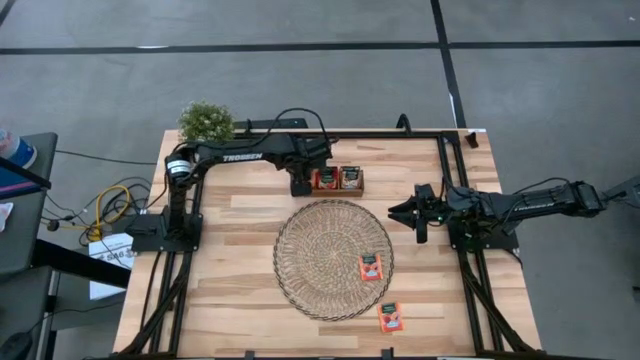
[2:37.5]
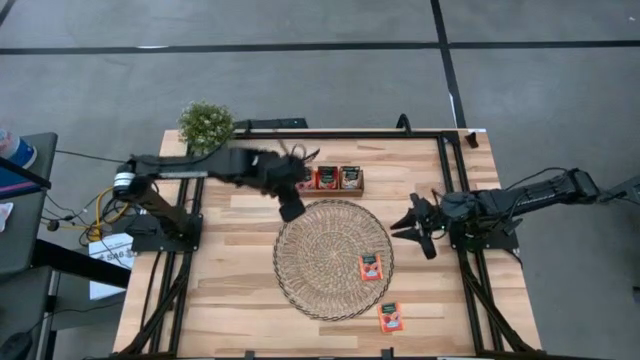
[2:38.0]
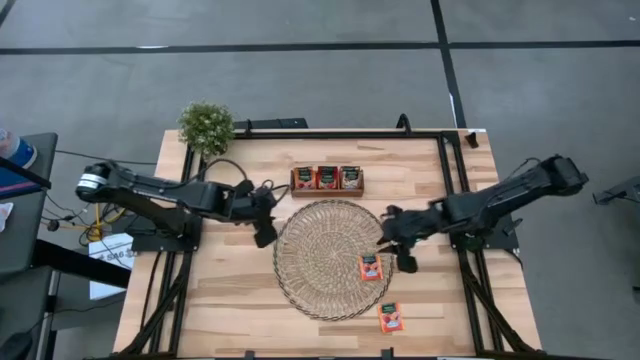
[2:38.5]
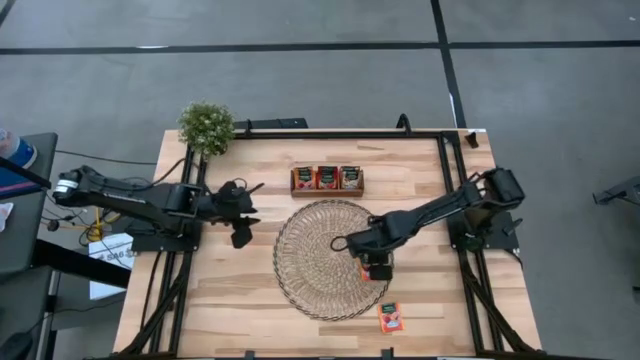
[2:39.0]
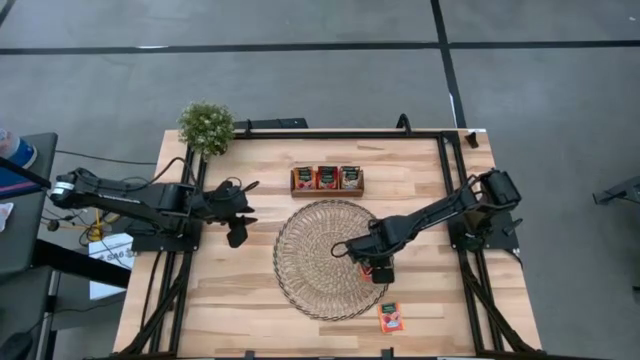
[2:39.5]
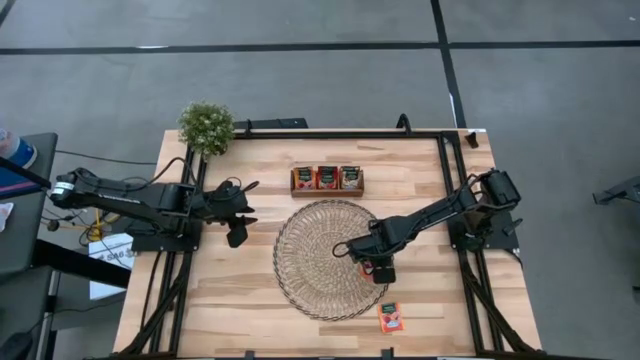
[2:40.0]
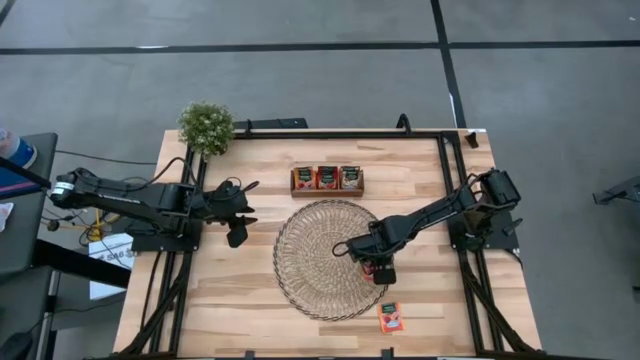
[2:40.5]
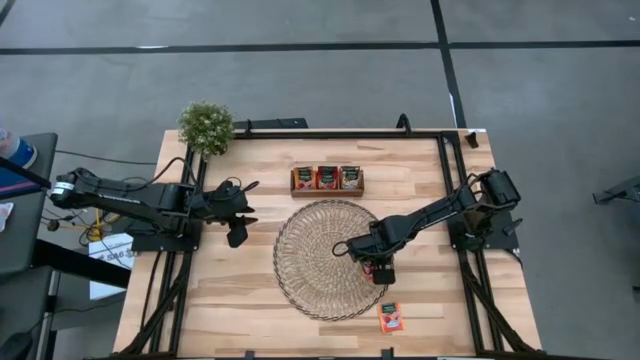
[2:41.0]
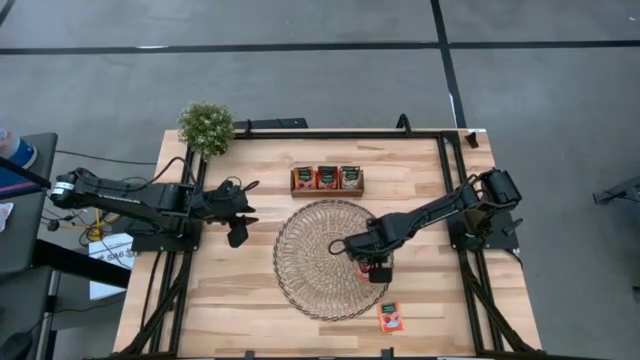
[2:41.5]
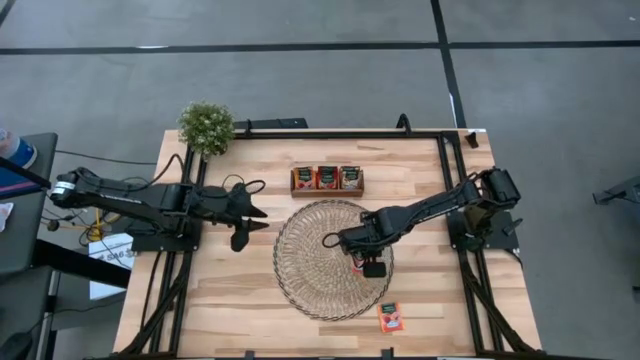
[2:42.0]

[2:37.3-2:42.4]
Task: Pick & Place Tea
Put the orange tea bag into the left section of the wooden organizer

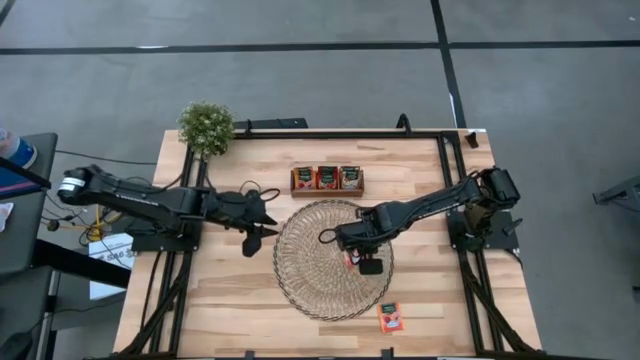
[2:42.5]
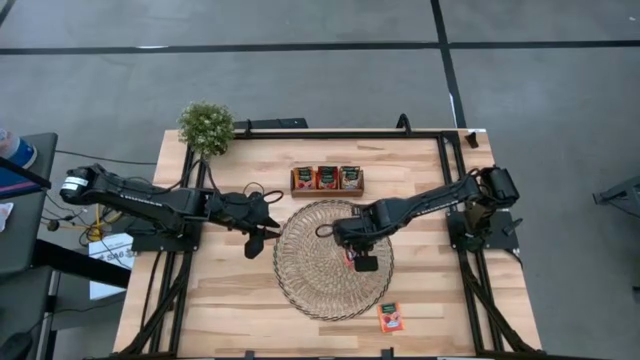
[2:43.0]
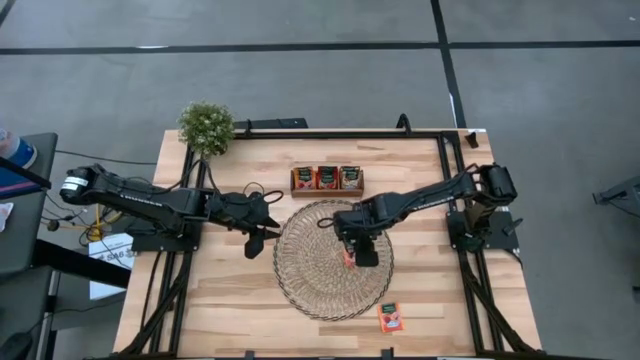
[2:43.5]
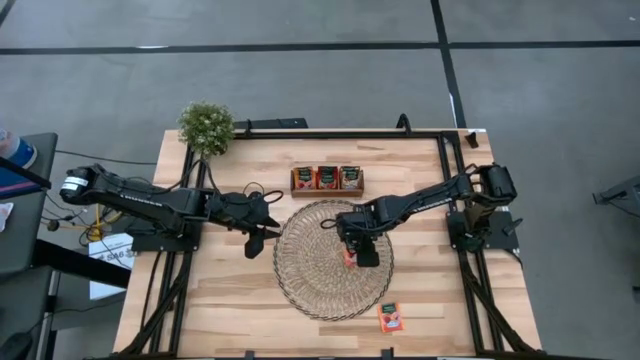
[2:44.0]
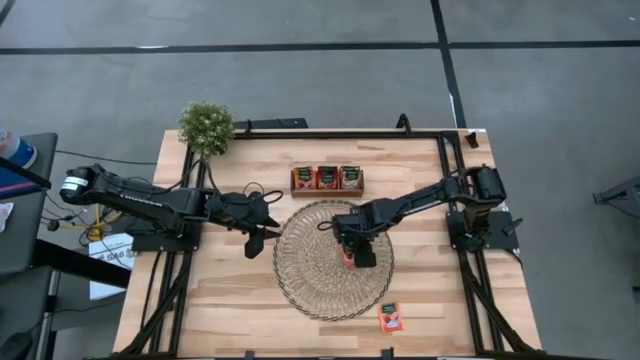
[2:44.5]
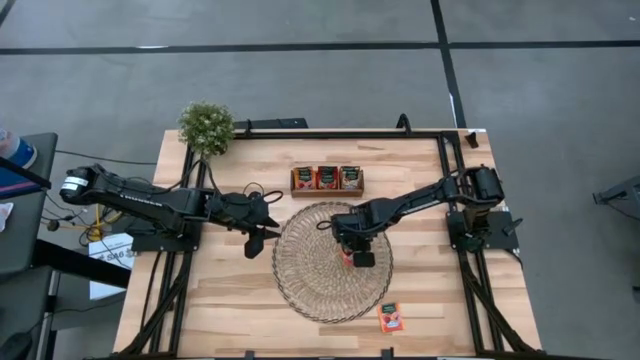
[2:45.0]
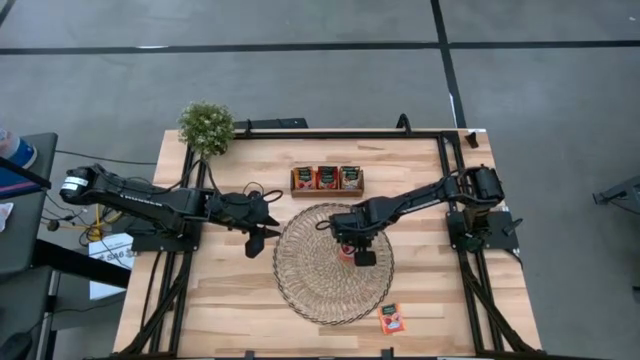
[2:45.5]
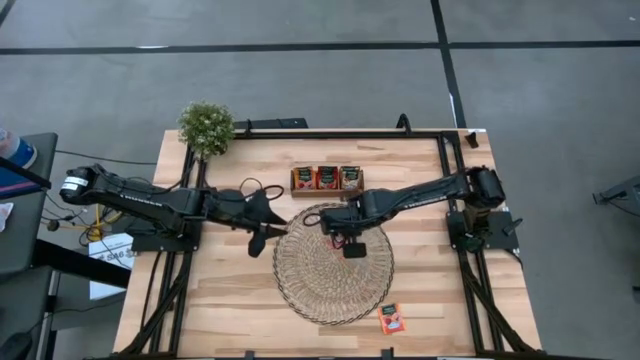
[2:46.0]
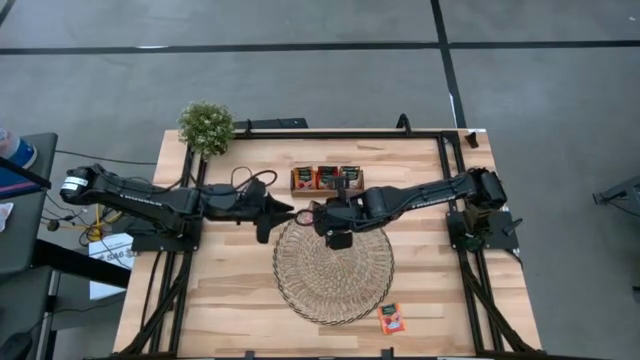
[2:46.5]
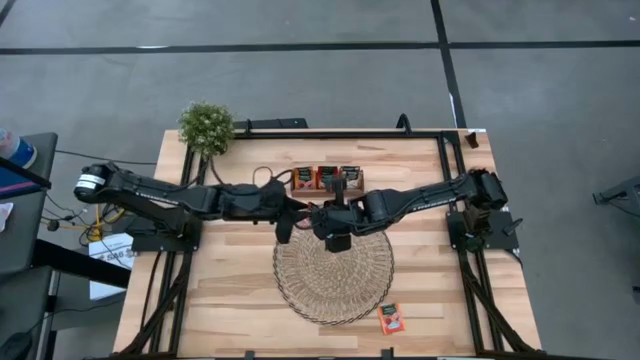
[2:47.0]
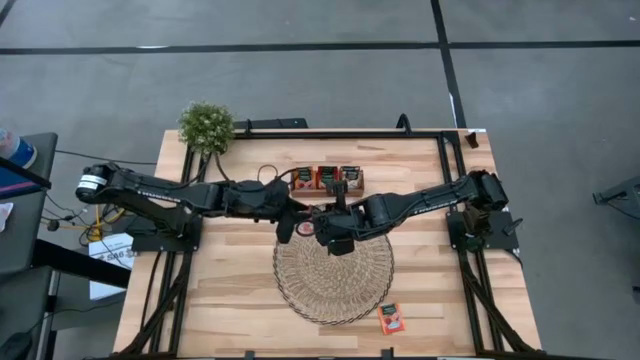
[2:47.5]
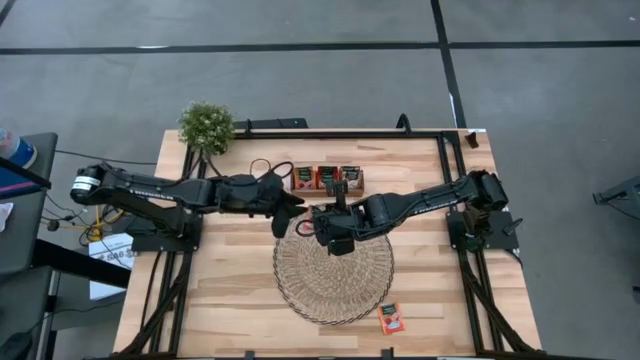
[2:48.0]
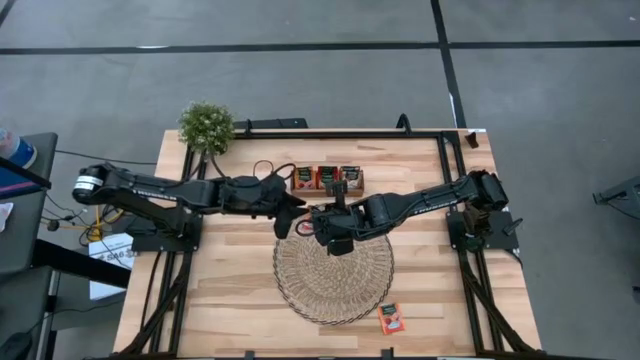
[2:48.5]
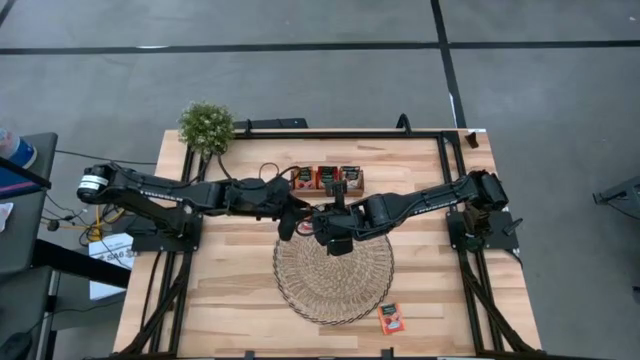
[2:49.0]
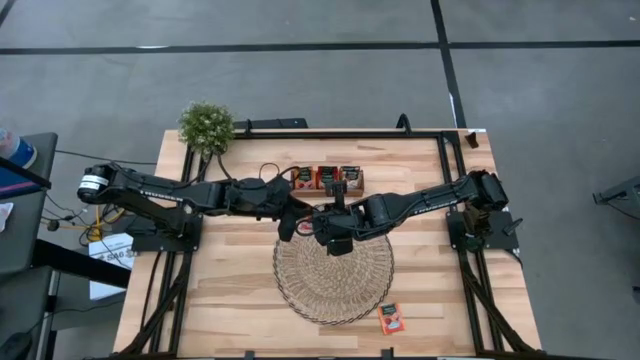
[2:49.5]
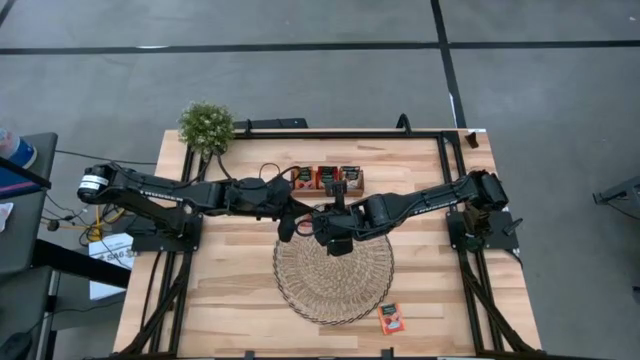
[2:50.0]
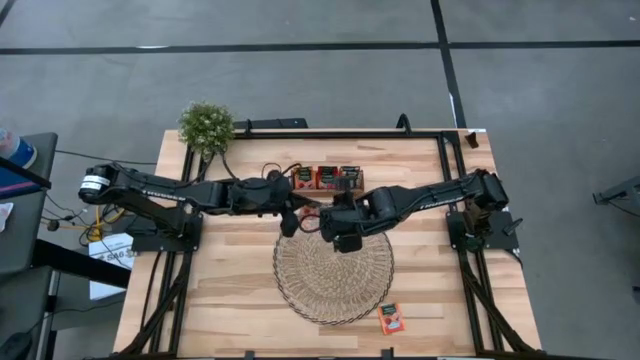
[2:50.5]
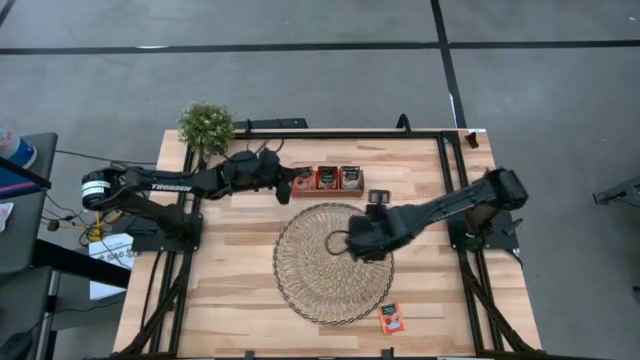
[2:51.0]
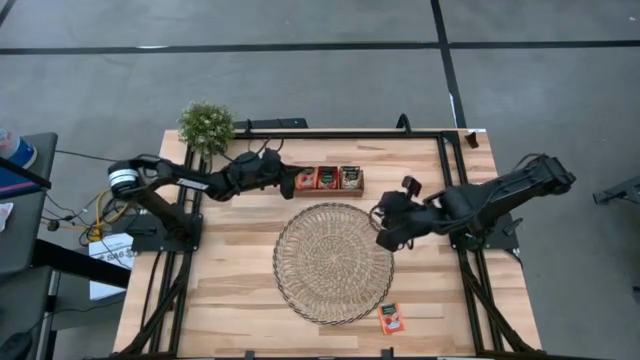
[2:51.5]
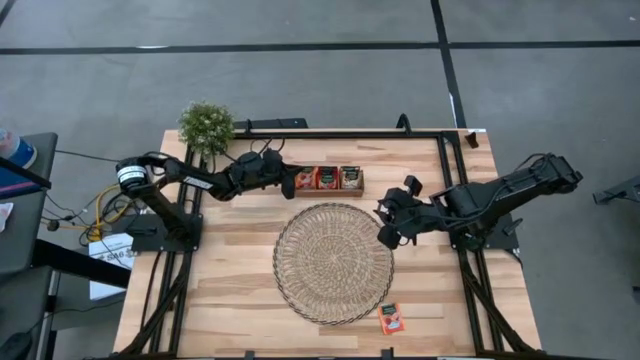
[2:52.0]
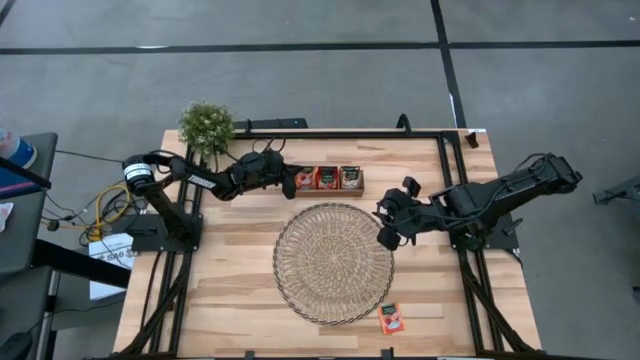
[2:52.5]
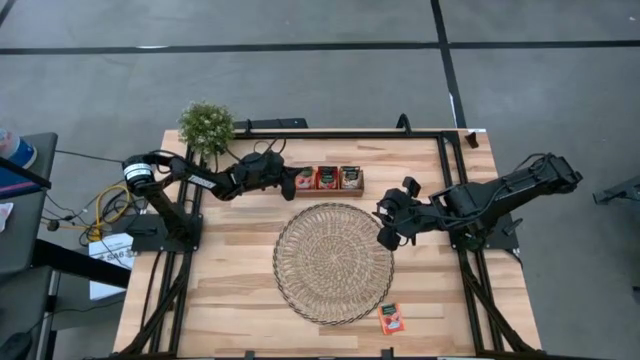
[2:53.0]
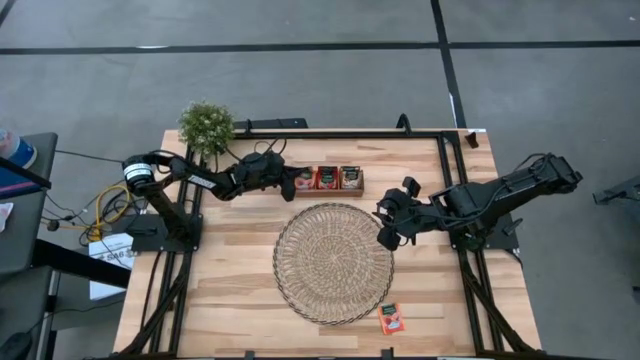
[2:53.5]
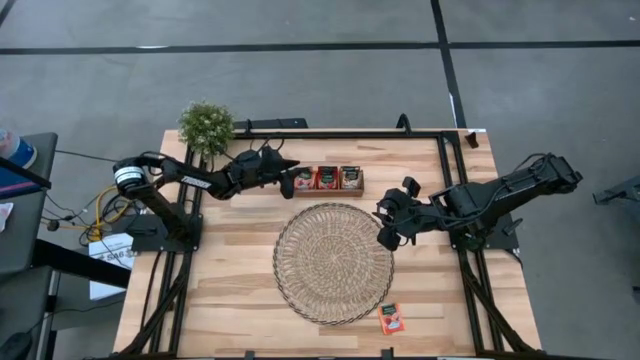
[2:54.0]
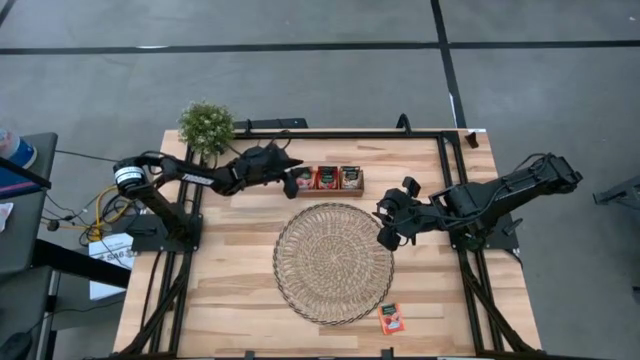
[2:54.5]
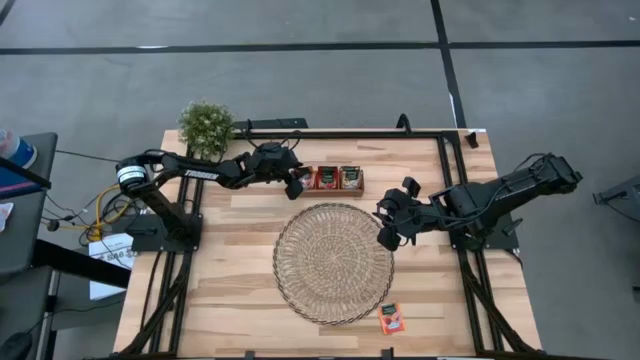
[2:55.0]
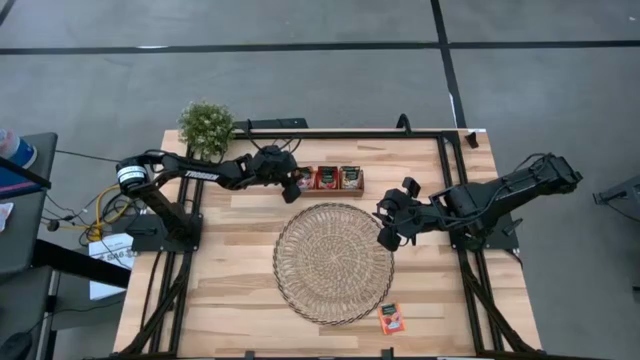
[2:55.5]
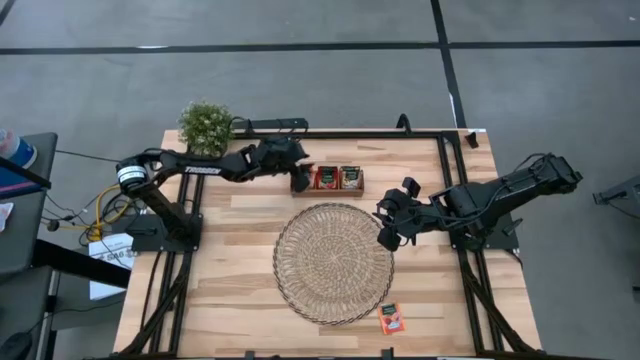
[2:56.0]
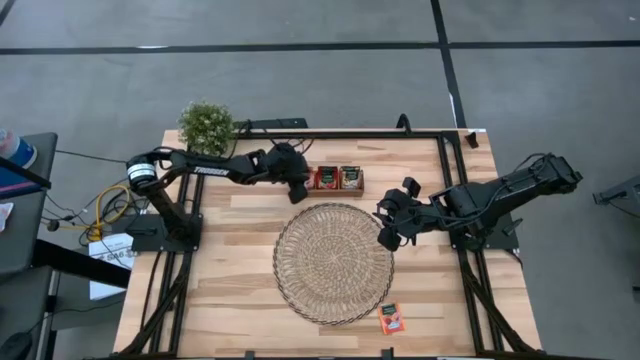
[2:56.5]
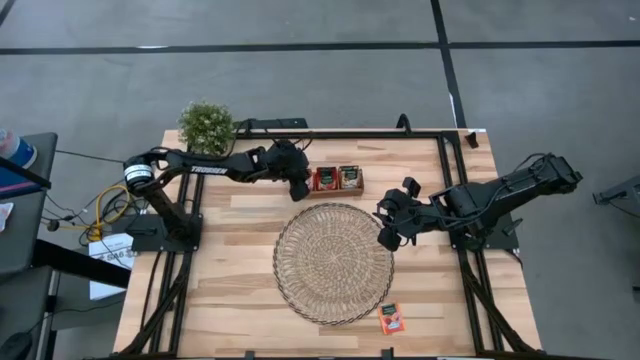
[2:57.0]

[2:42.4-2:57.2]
Put the orange tea bag into the left section of the wooden organizer
